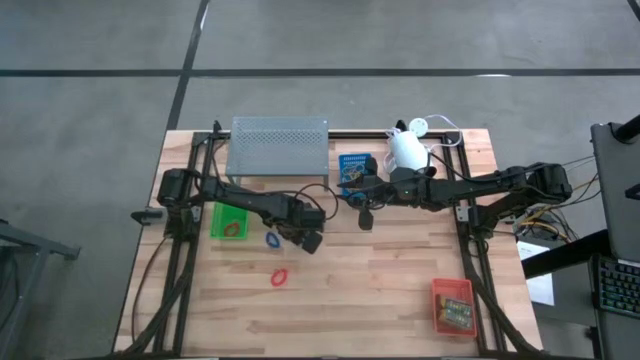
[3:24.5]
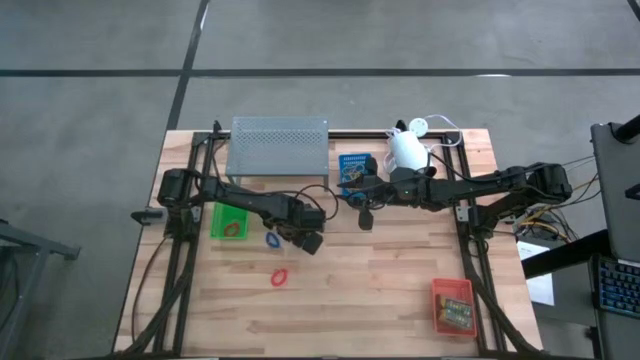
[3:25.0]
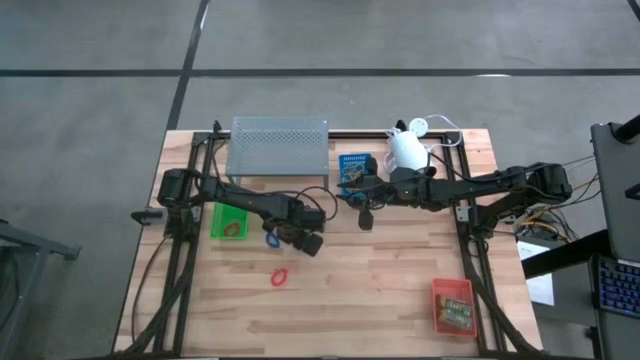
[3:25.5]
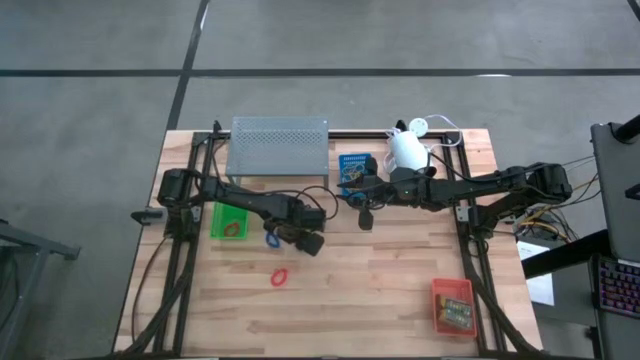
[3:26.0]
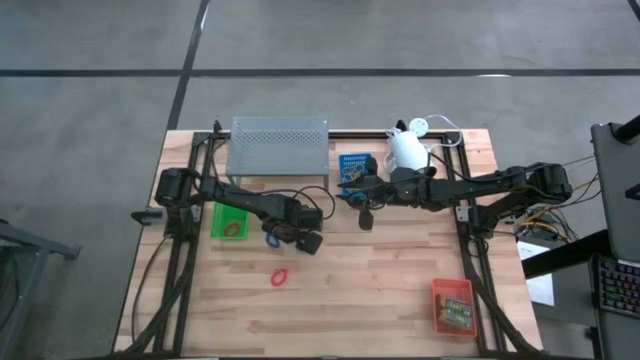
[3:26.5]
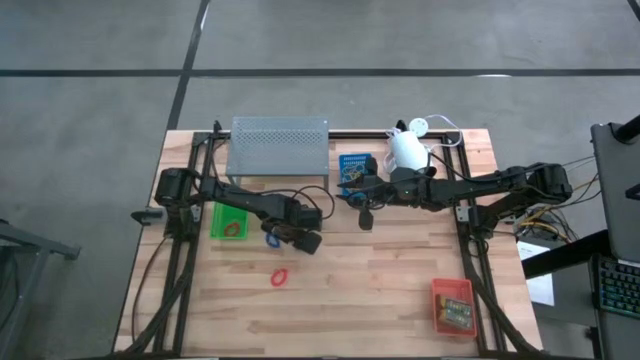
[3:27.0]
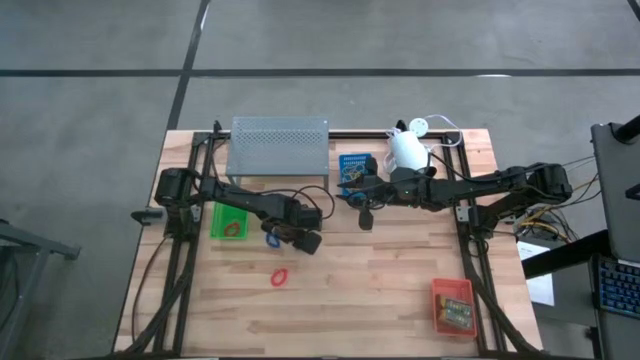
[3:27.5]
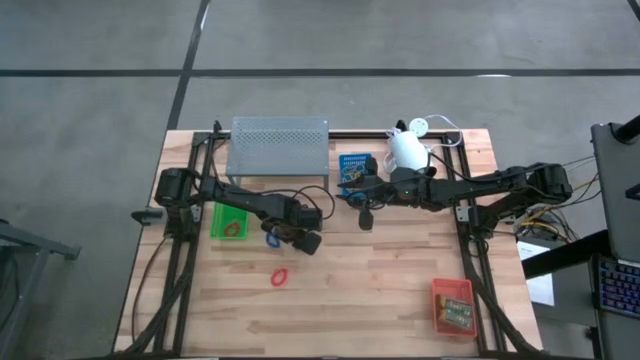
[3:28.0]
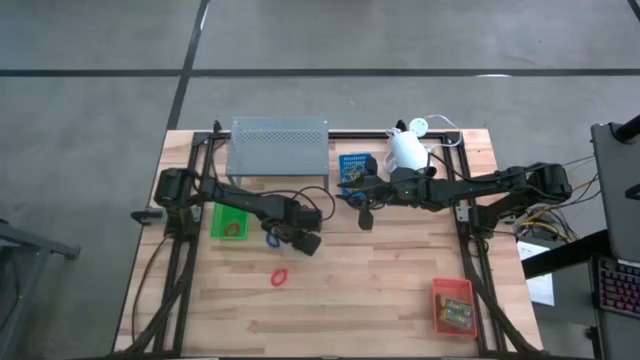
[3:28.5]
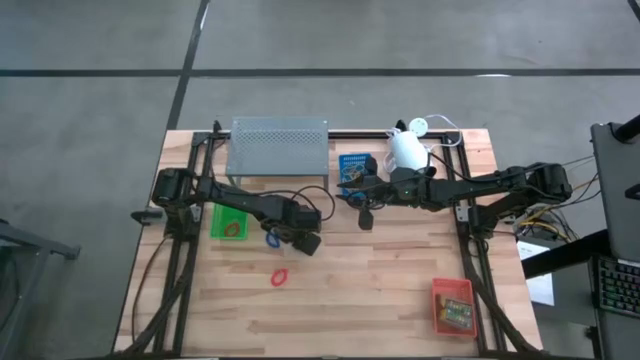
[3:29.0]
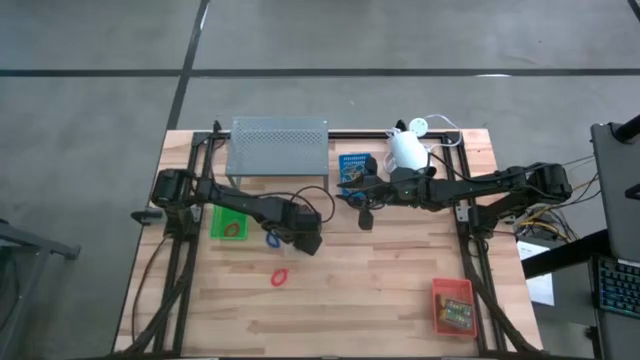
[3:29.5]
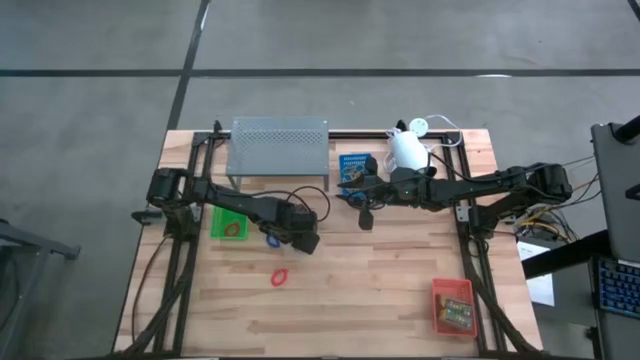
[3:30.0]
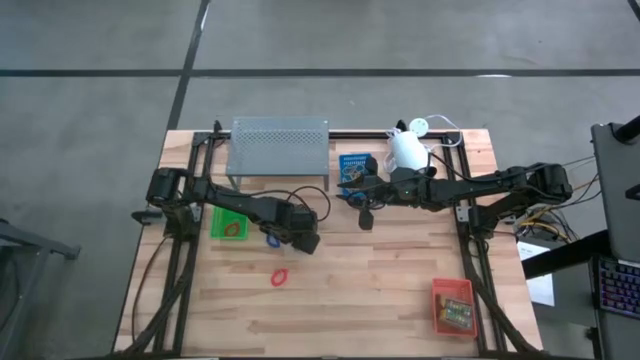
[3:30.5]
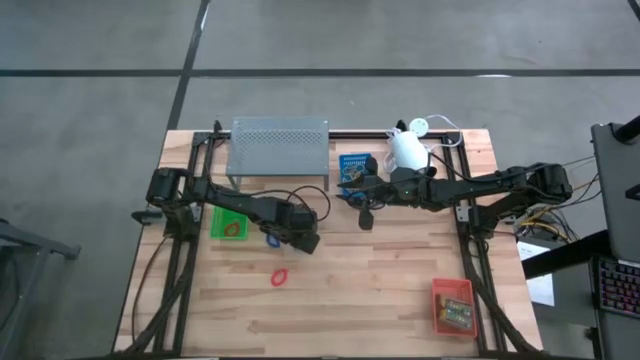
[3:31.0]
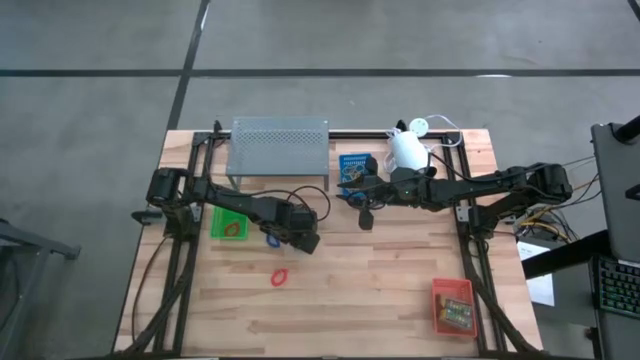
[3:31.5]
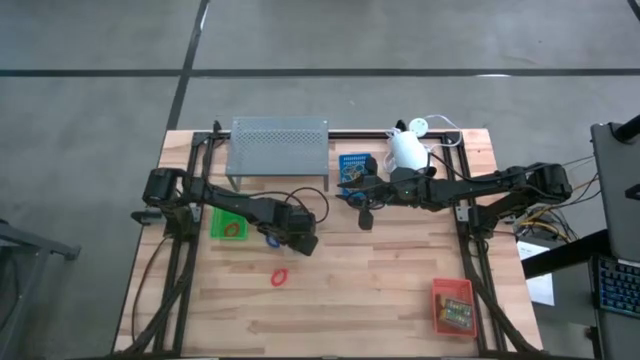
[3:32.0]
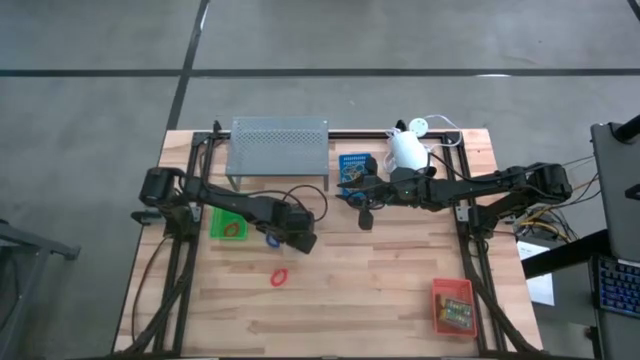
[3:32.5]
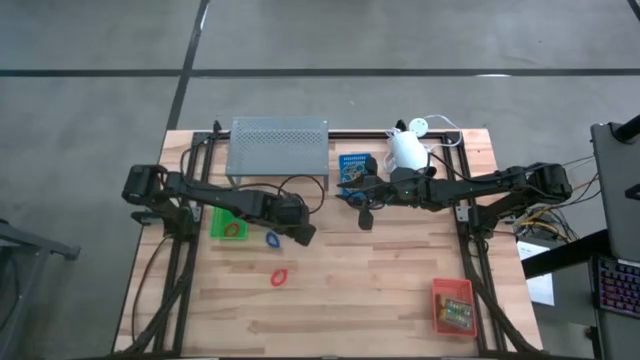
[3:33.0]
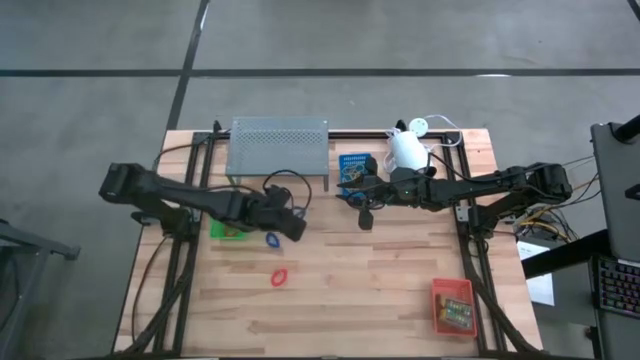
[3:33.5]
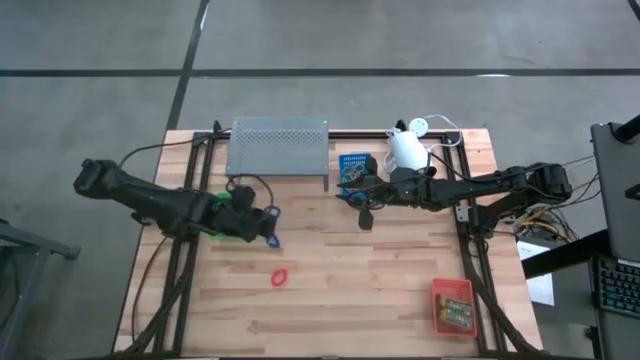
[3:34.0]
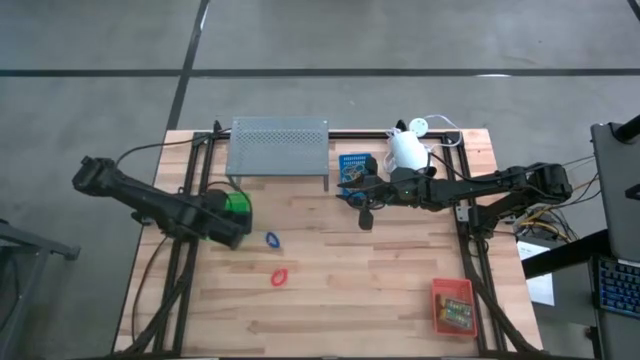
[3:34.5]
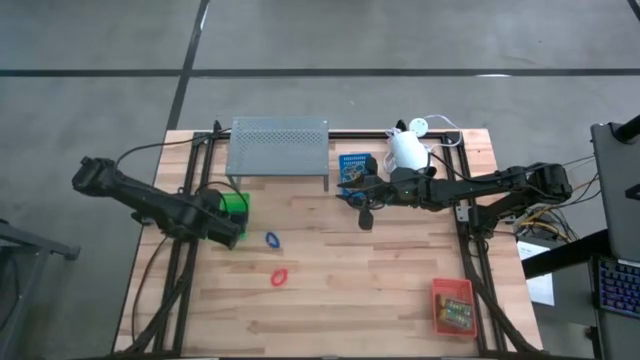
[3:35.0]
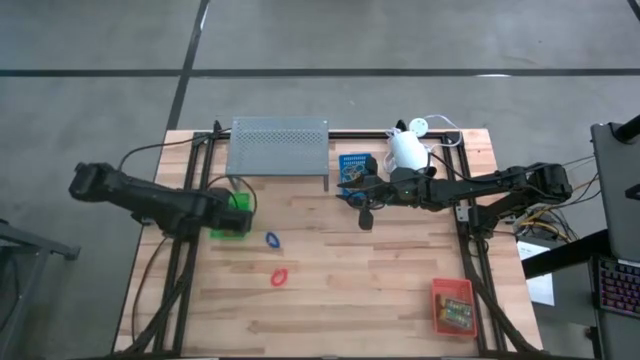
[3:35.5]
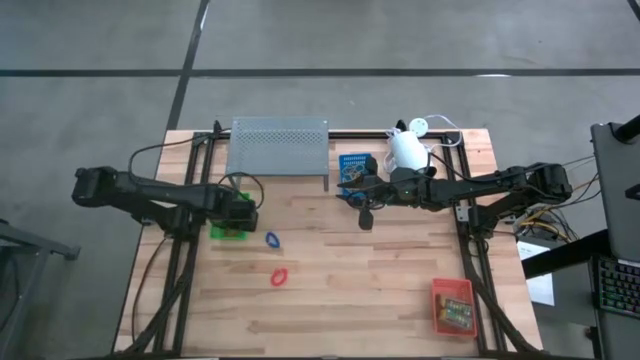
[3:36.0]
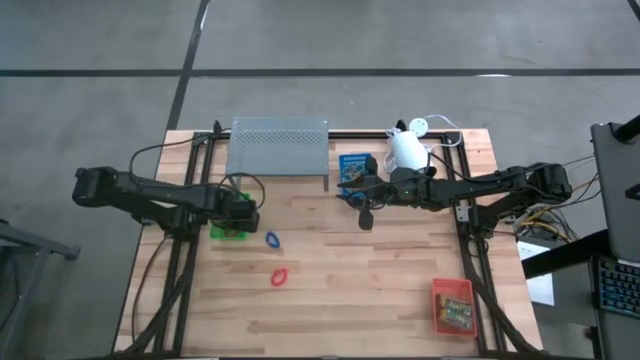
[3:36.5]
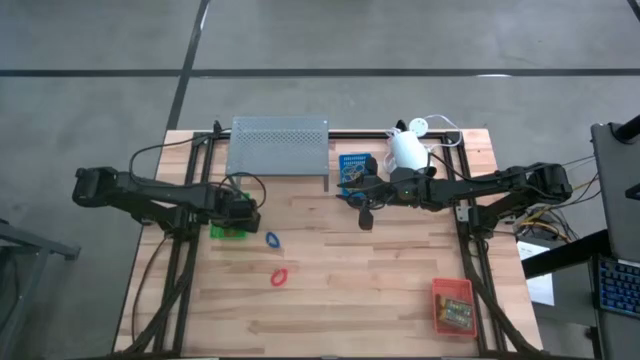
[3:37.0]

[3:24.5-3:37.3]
Task: Pick & Place Office Desk Supplies
Put the blue spring keychain into the green bin

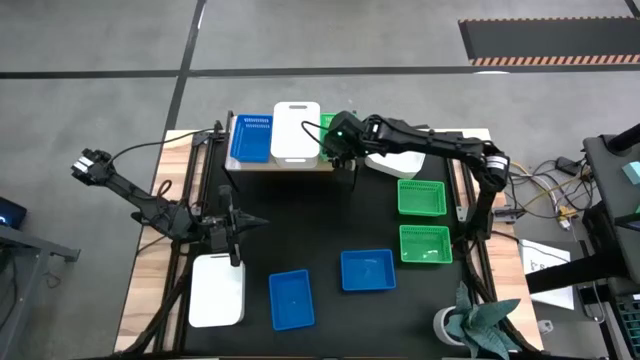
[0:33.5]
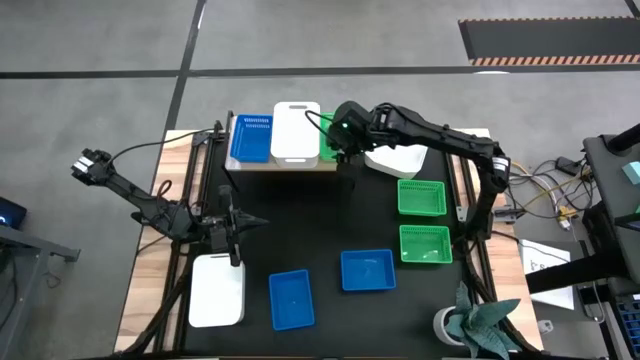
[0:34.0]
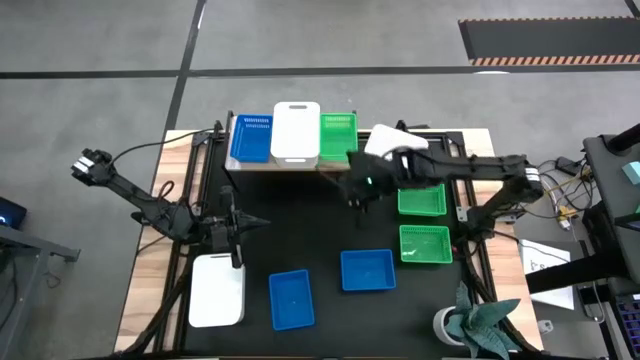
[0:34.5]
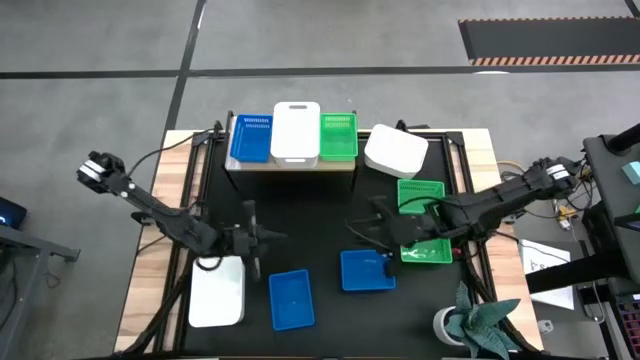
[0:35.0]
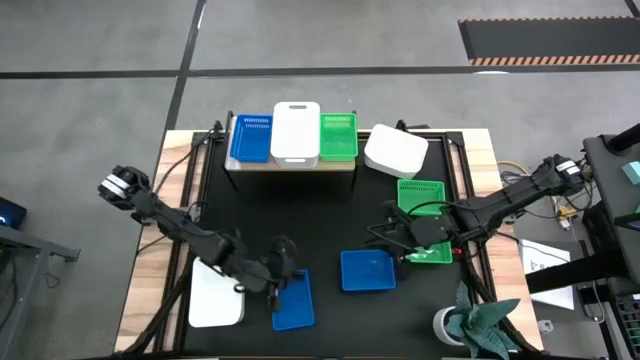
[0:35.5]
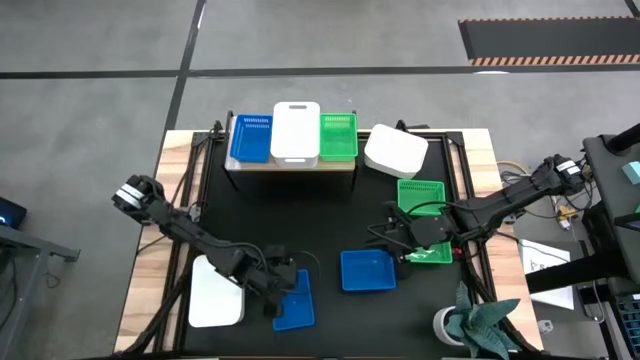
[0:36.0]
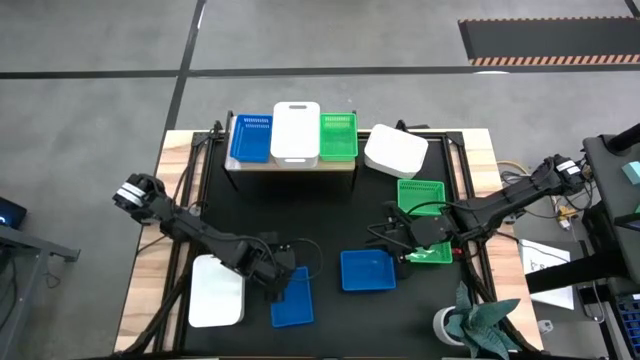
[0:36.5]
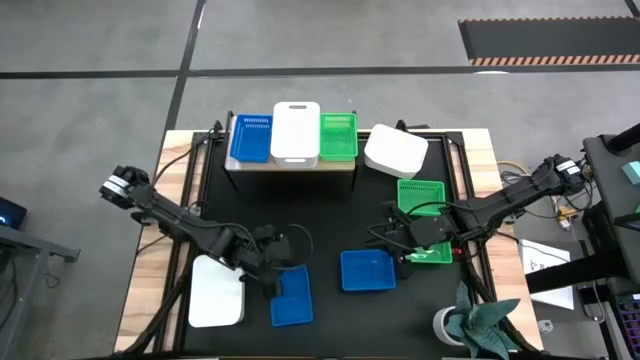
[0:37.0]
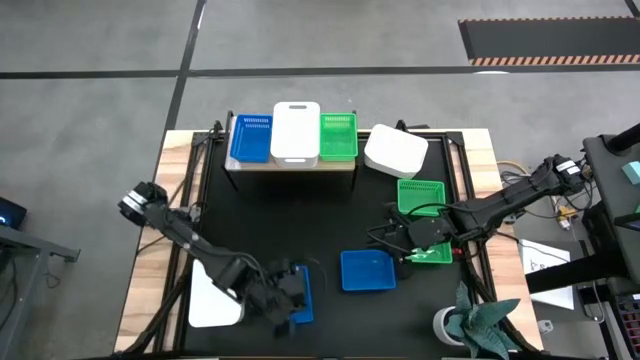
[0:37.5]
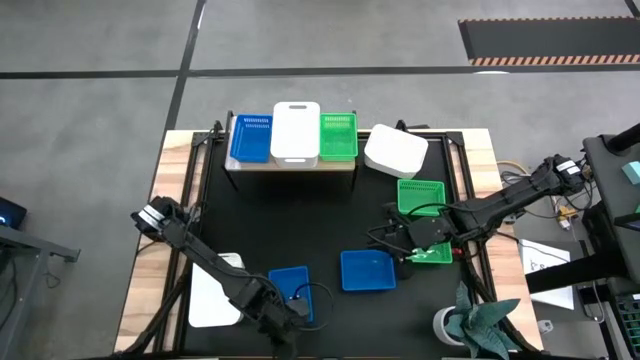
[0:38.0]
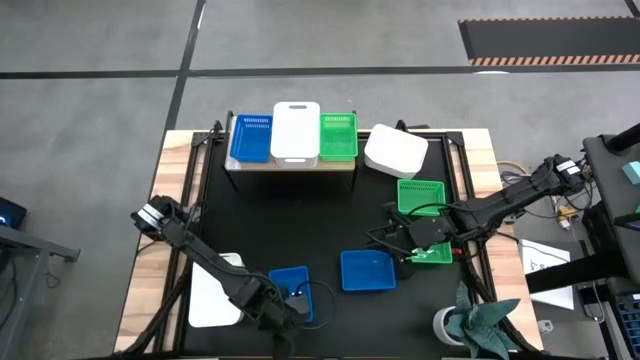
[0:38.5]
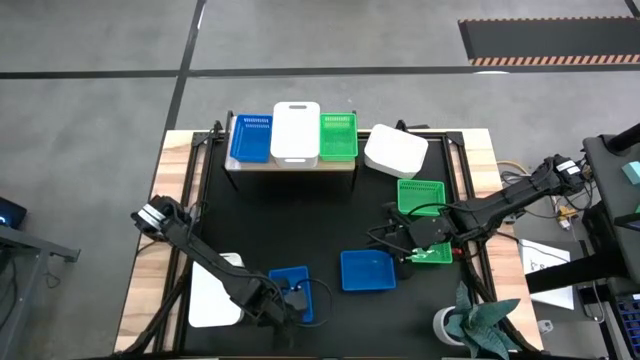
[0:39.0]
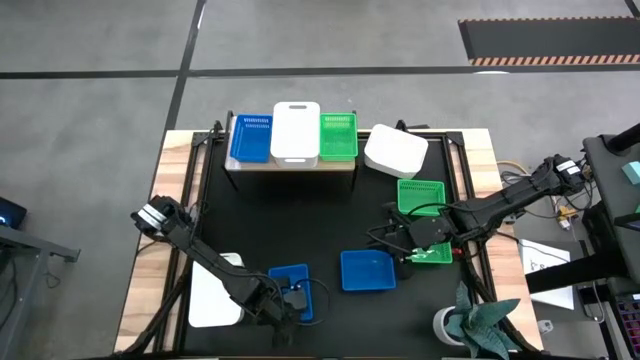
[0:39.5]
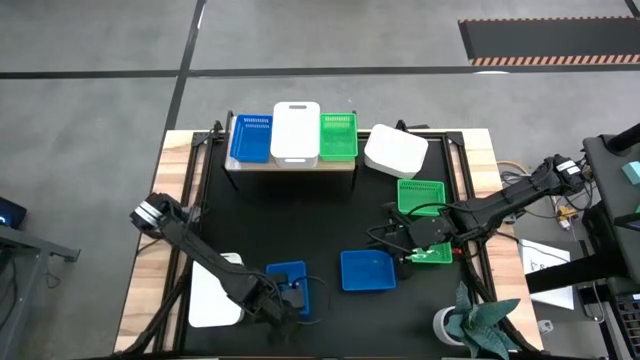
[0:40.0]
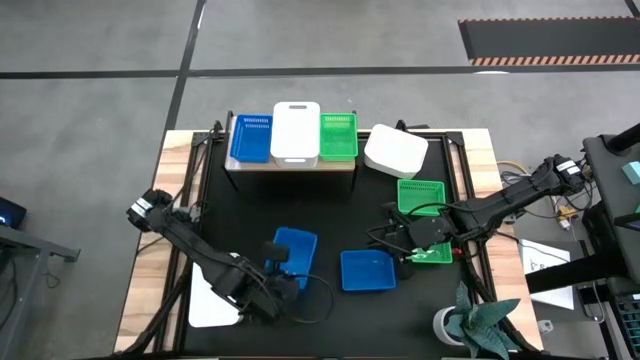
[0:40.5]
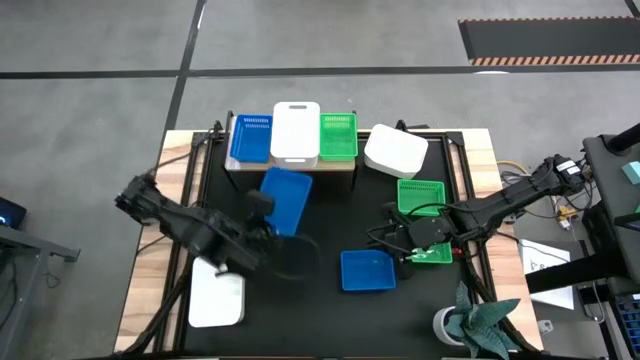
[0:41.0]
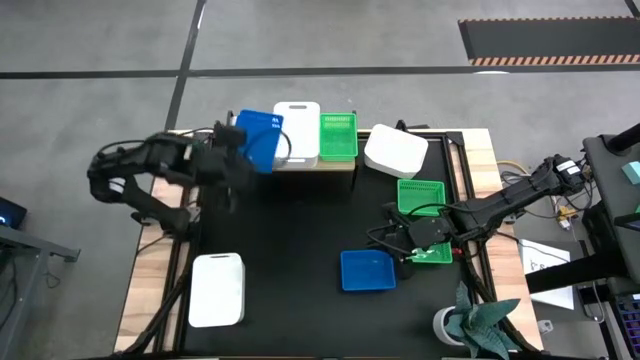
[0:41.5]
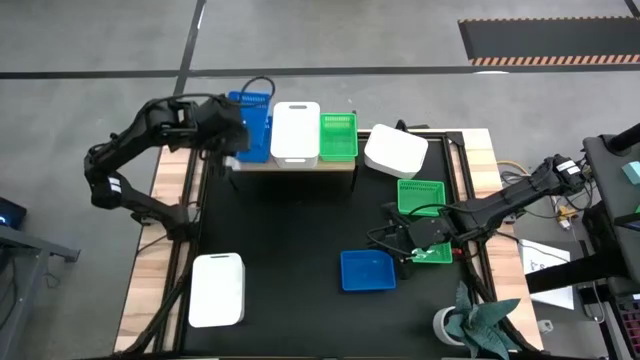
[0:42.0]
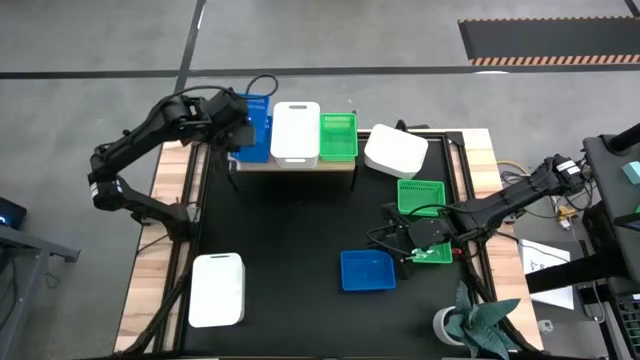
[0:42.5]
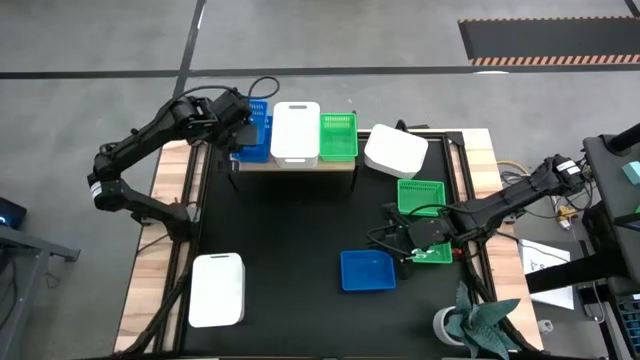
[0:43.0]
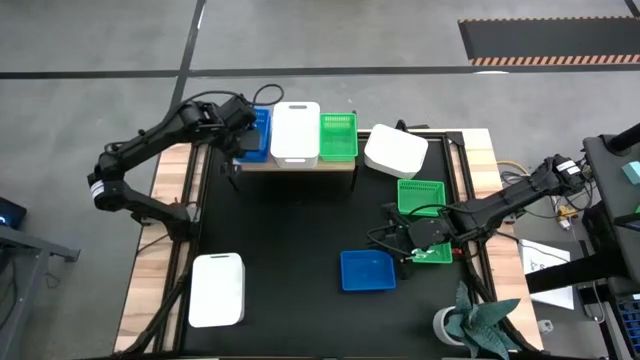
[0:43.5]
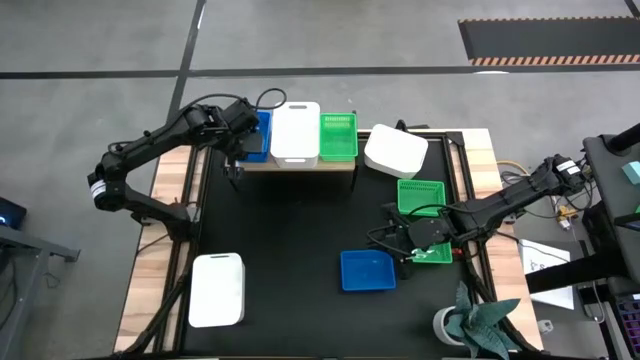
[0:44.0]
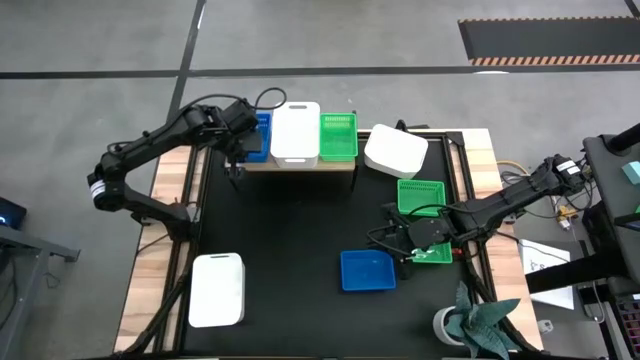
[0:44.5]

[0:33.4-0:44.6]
Task: Stack baskets on shelf by color
Stack the left blue bin on top of the blue bin on the shelf
